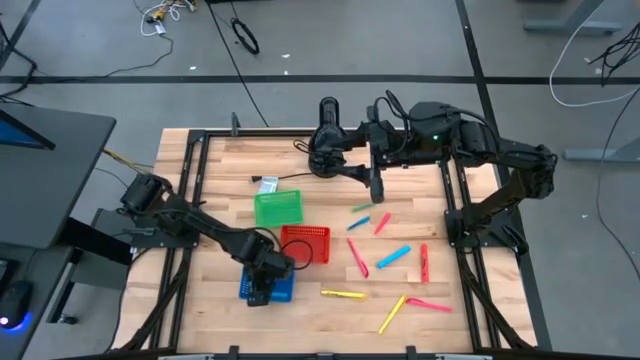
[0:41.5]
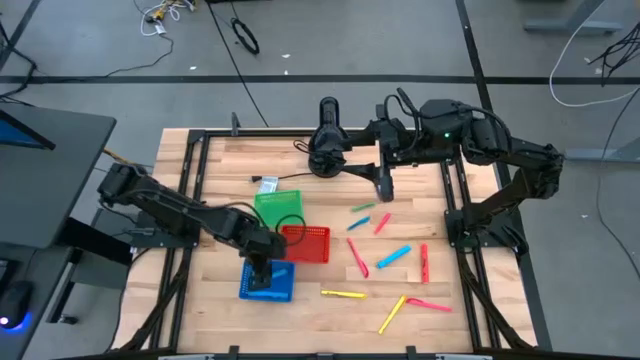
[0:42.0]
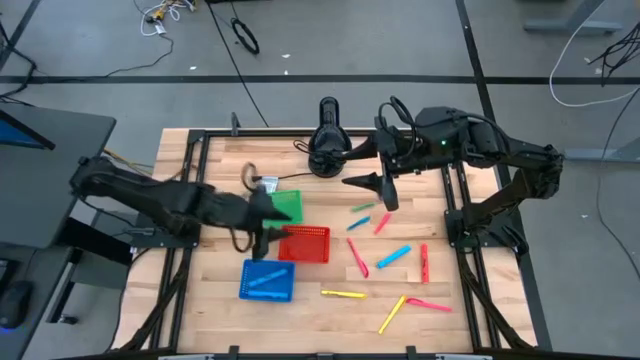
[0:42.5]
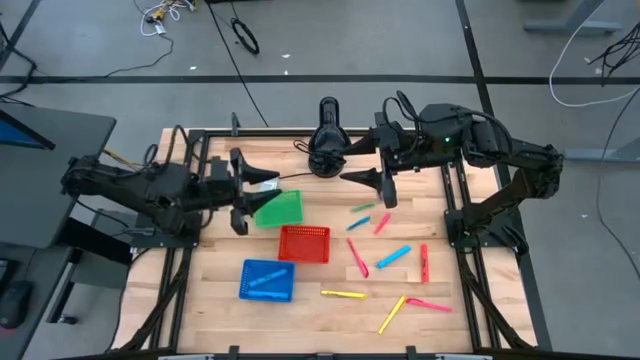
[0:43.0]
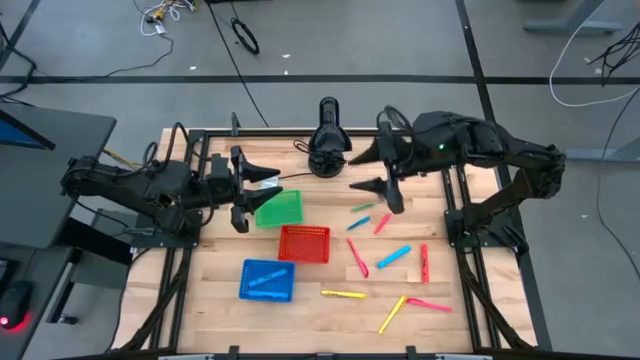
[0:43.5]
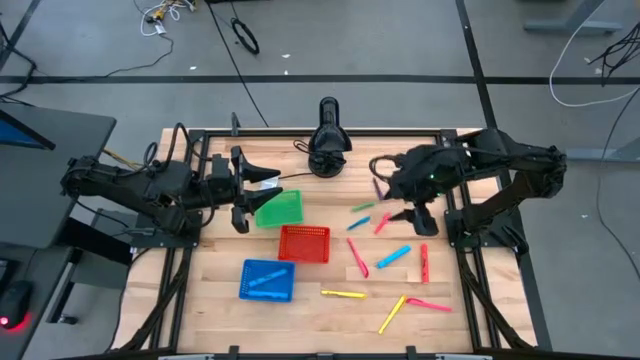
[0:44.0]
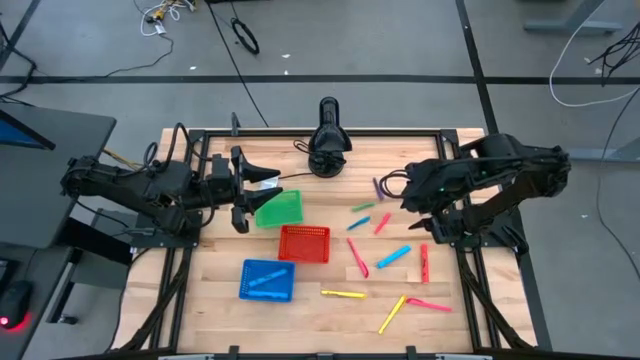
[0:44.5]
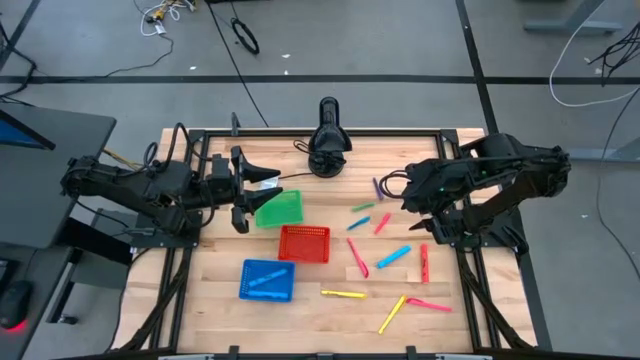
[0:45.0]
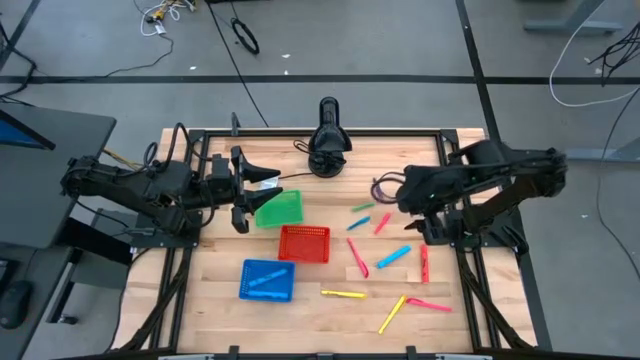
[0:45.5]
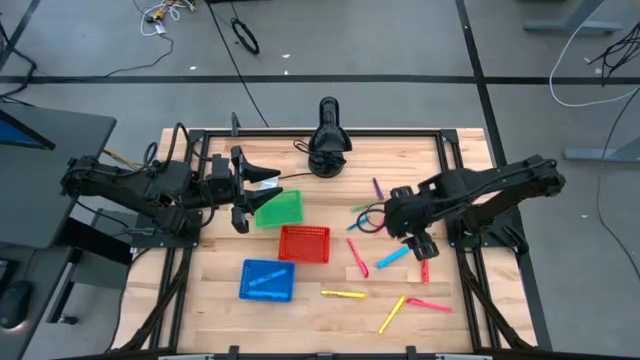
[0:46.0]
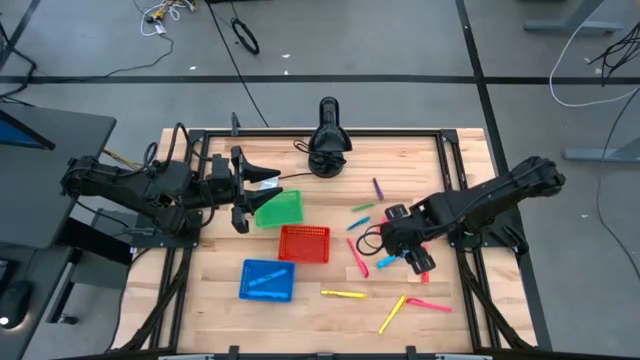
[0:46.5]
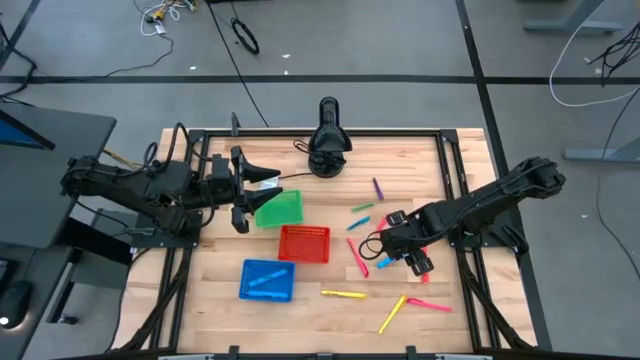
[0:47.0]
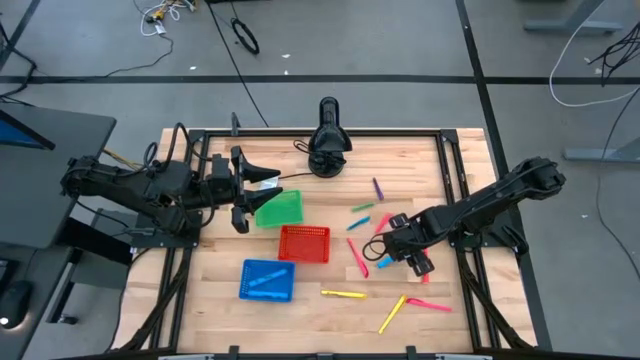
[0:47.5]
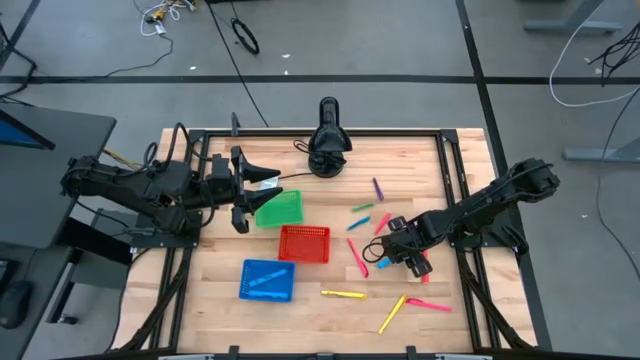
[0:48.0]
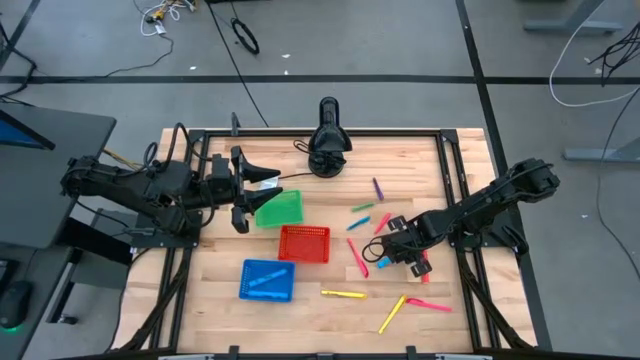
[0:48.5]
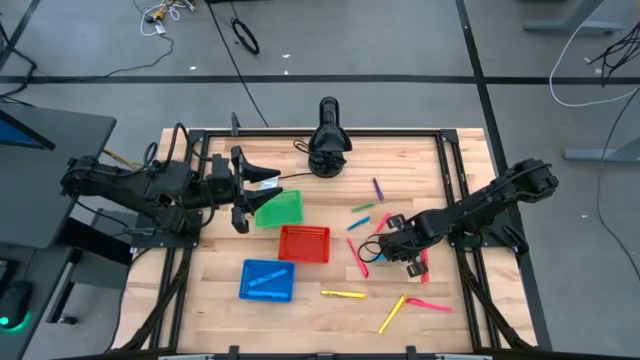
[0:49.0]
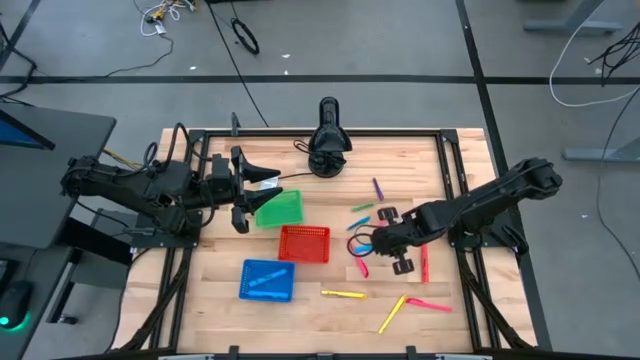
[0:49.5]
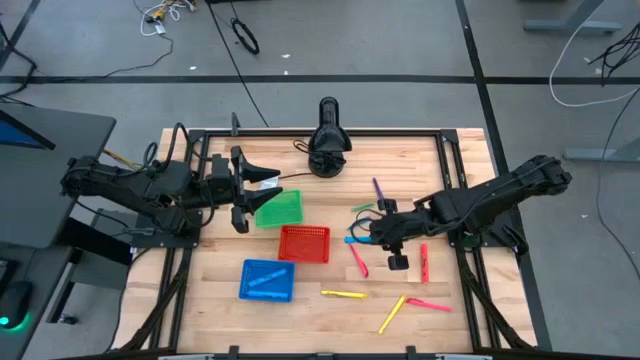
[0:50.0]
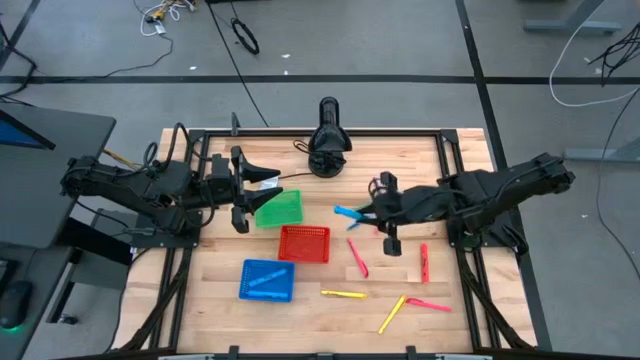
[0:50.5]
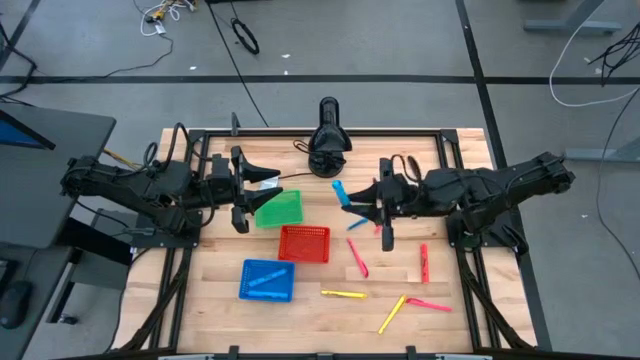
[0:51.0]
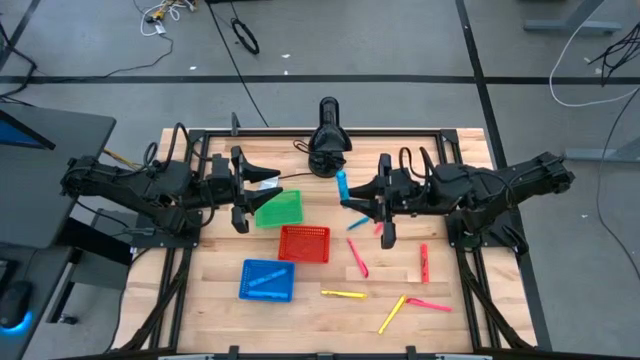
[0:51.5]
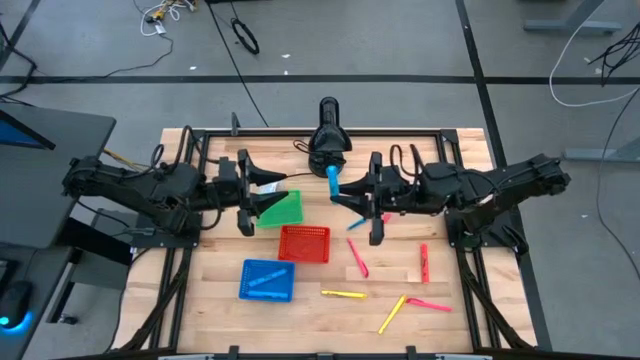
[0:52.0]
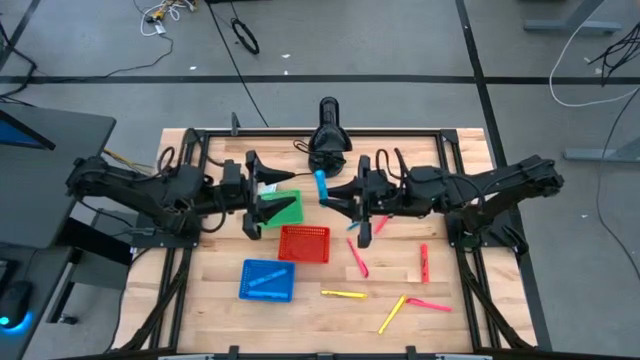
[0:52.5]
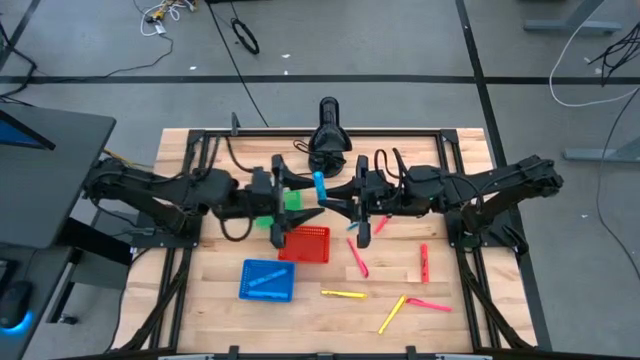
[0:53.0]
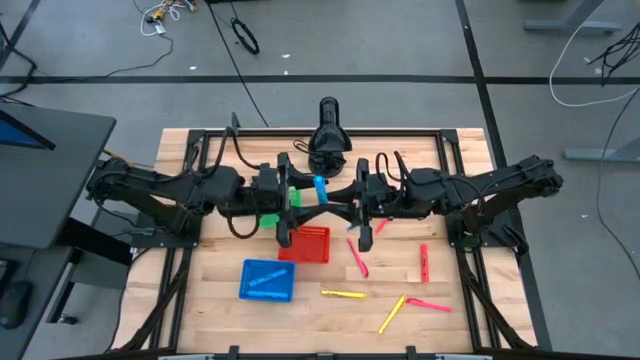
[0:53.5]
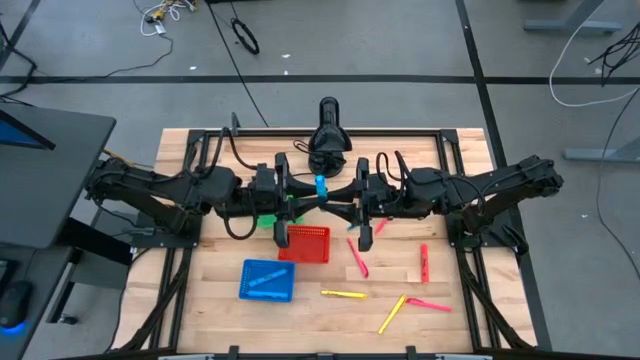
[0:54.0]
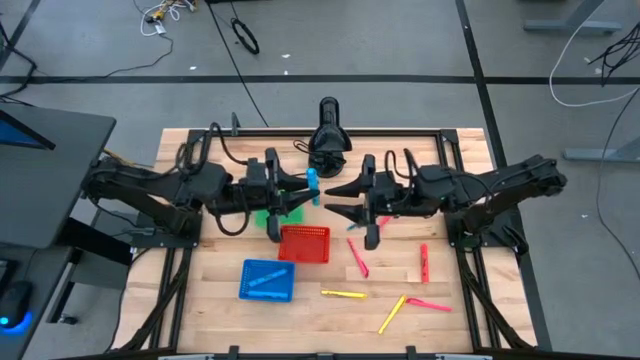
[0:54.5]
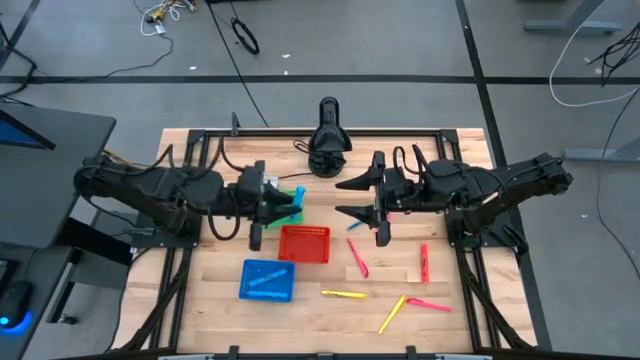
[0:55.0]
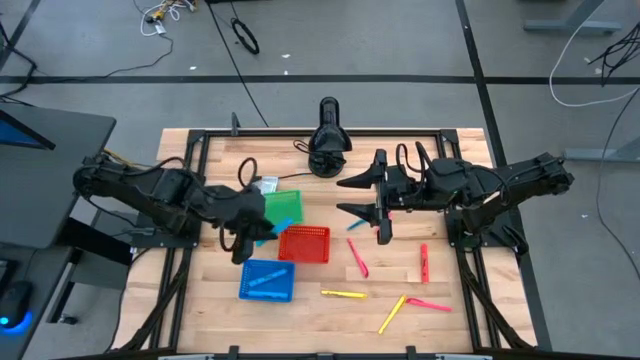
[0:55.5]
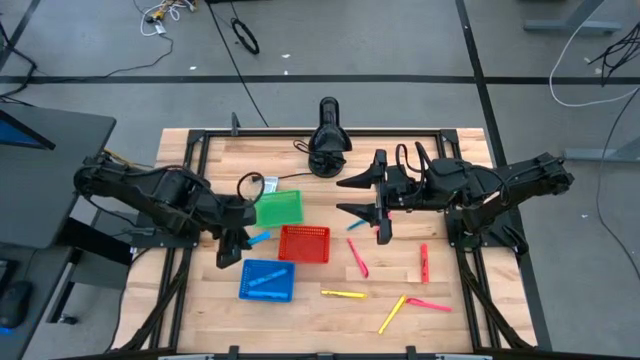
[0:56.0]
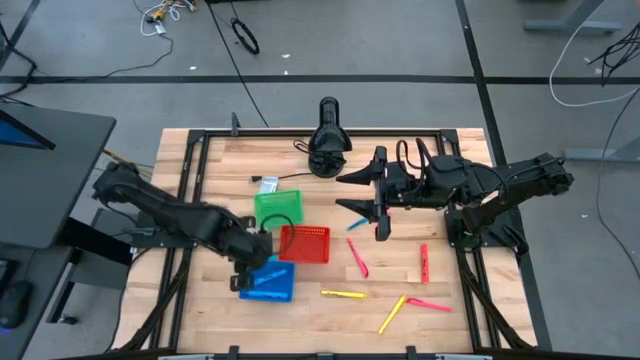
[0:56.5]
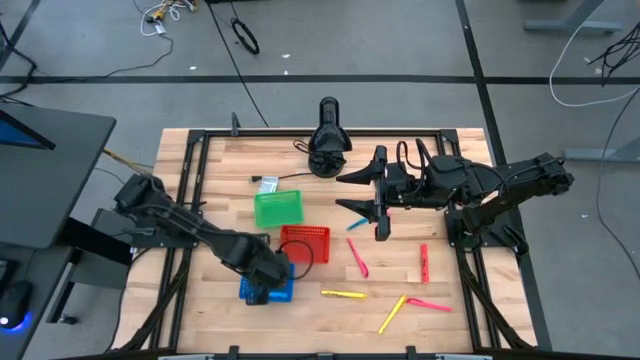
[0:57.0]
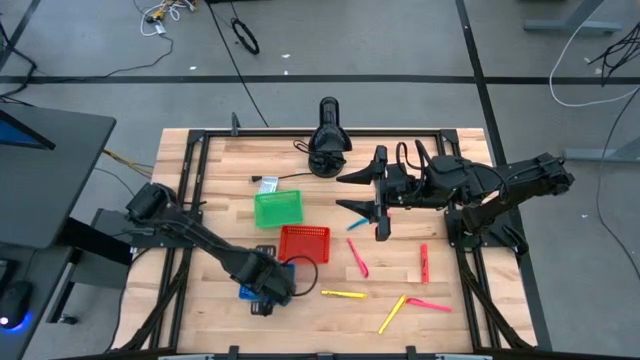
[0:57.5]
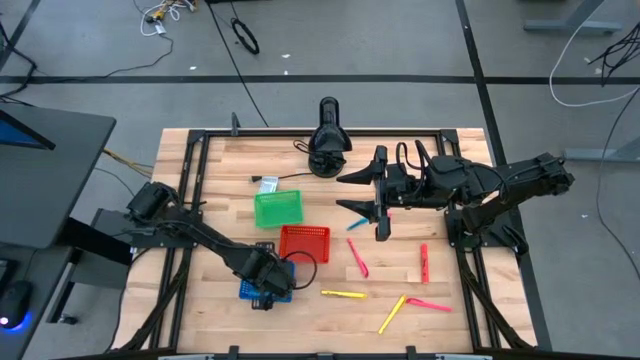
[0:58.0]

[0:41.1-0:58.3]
Task: Pick & Place Markers
Put the blue highlighter pen into the blue bin

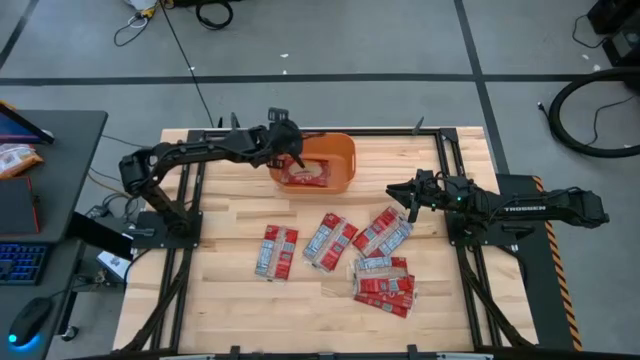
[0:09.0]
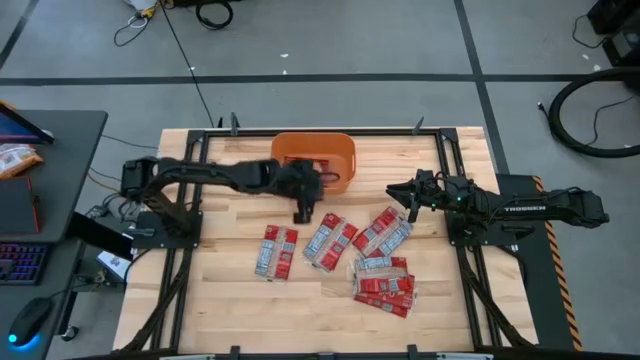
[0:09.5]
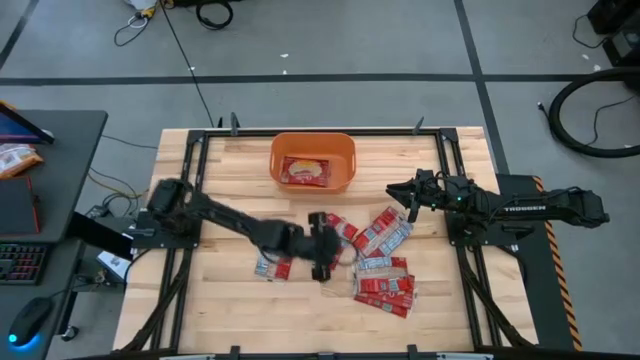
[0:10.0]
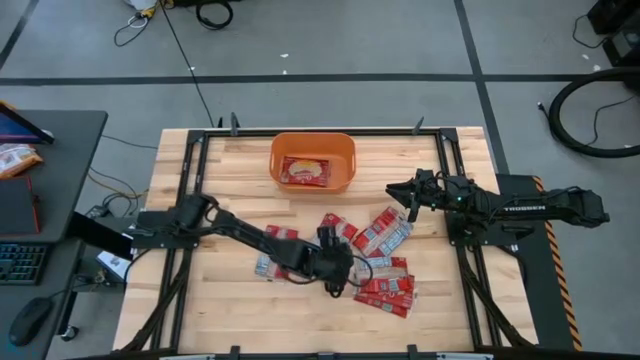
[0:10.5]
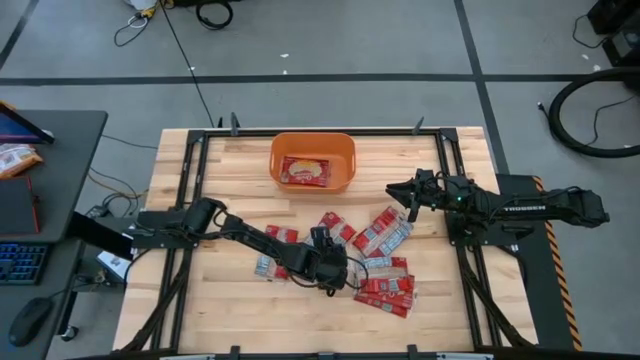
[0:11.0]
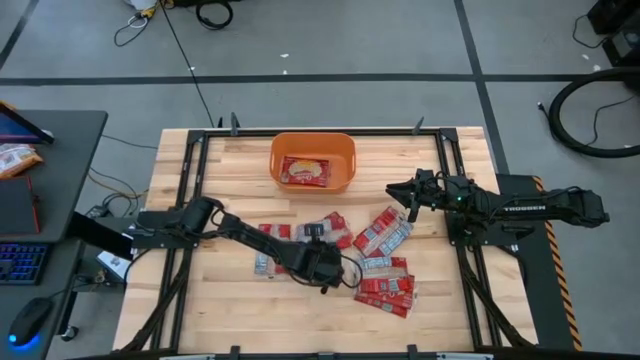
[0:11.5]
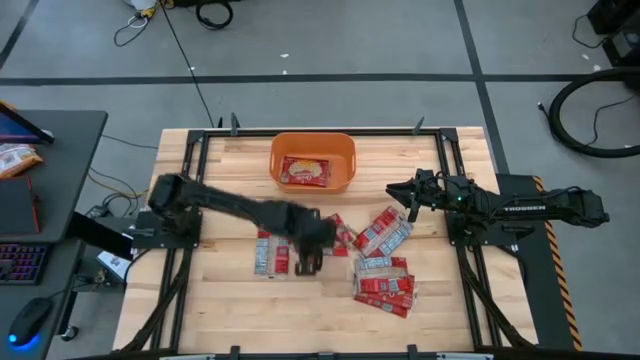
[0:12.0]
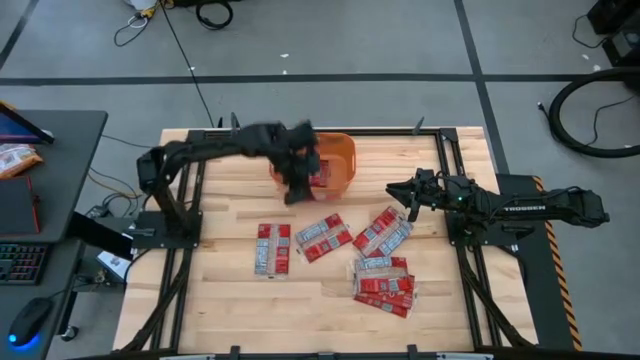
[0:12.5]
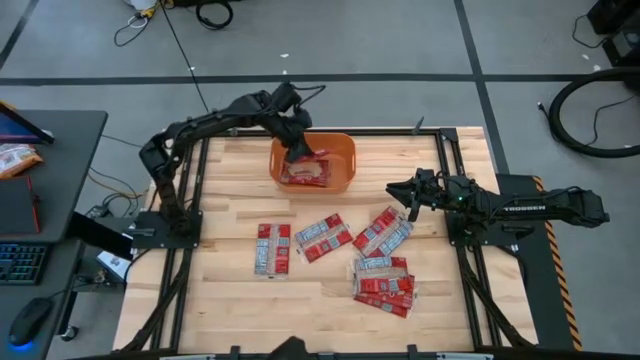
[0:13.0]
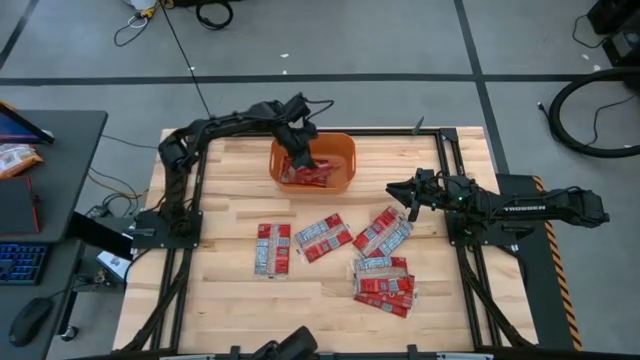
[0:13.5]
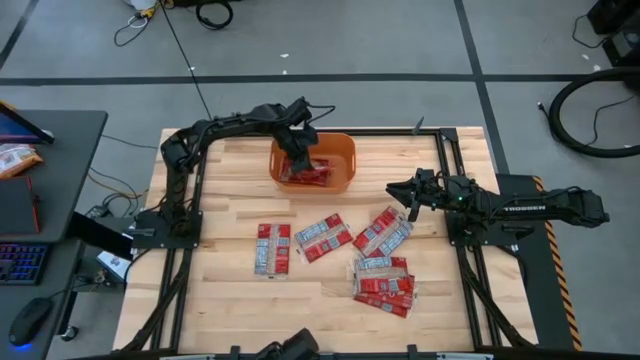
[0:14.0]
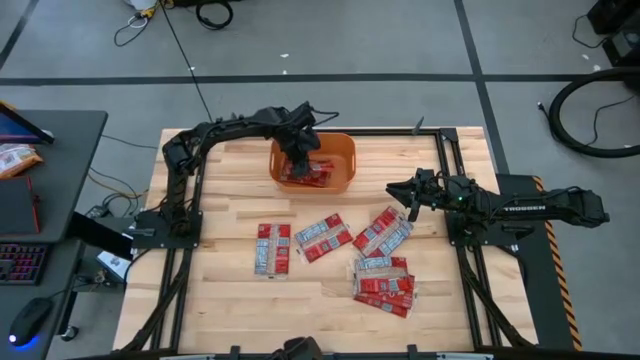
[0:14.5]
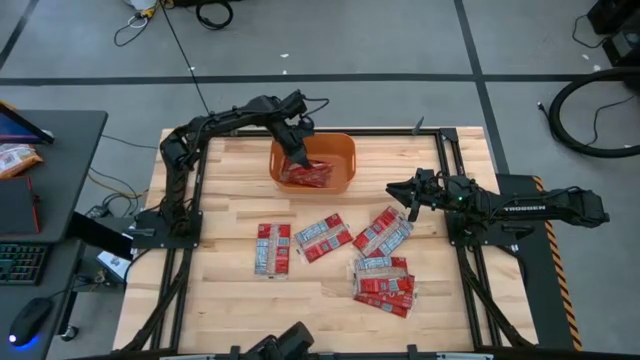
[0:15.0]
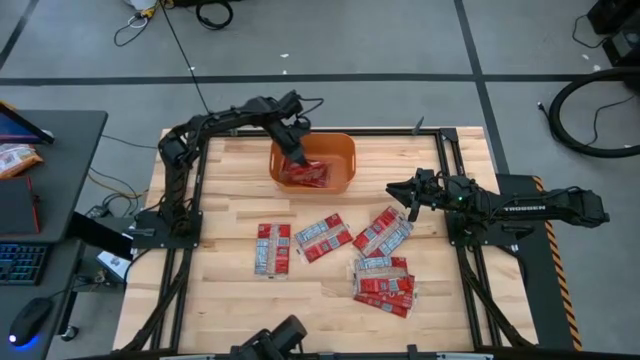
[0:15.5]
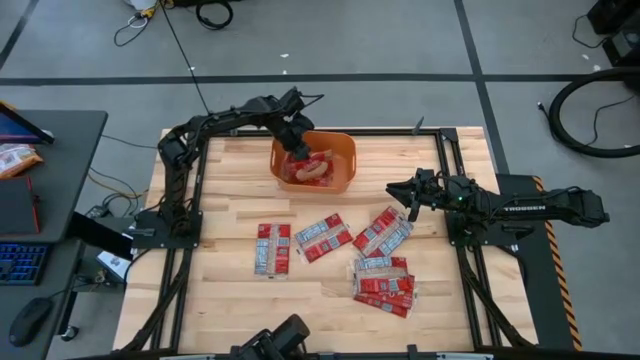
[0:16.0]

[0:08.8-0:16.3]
Task: Sort popcorn bags into baskets
Put the red popcorn bag into the orange bin
